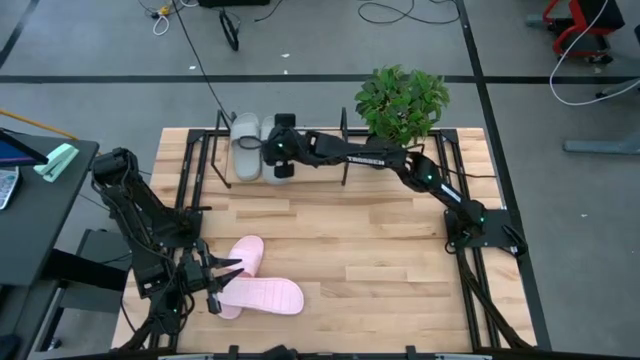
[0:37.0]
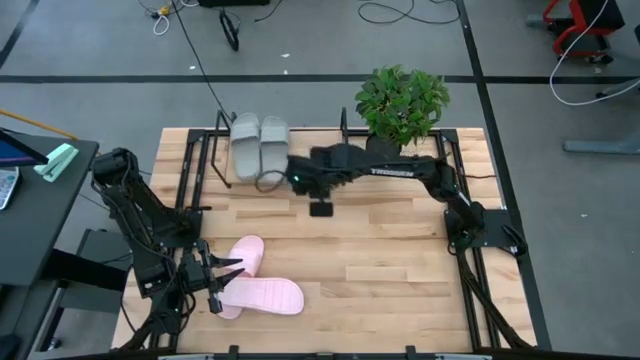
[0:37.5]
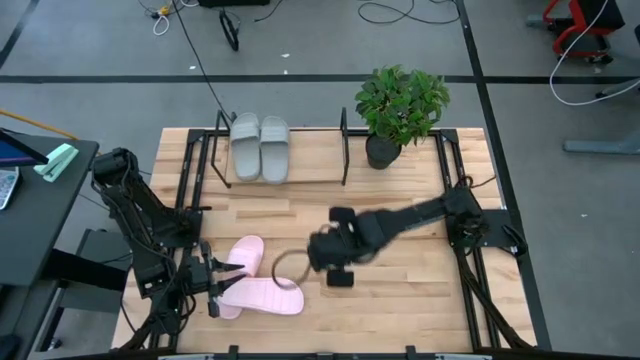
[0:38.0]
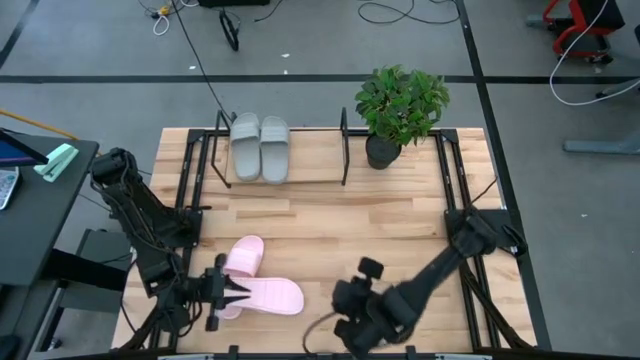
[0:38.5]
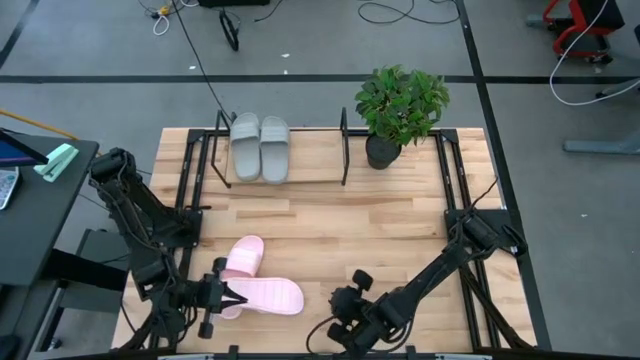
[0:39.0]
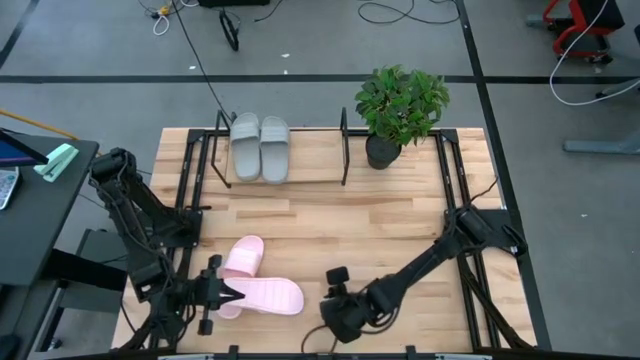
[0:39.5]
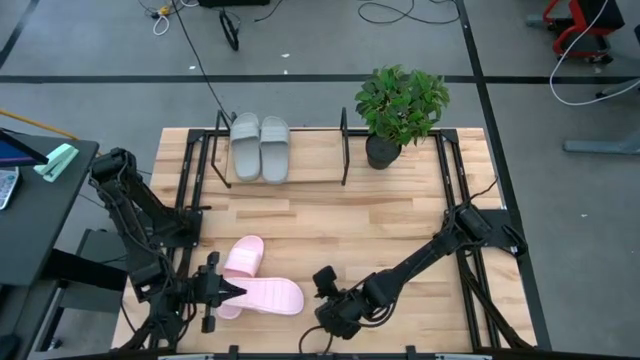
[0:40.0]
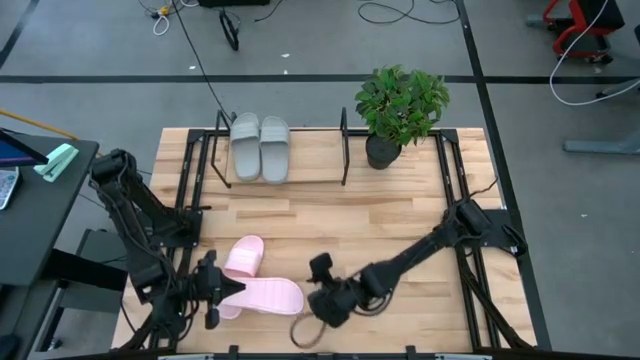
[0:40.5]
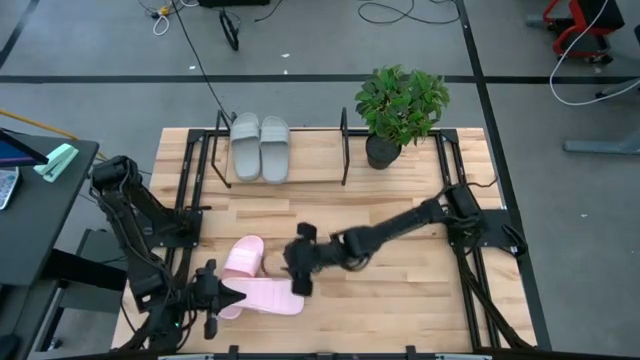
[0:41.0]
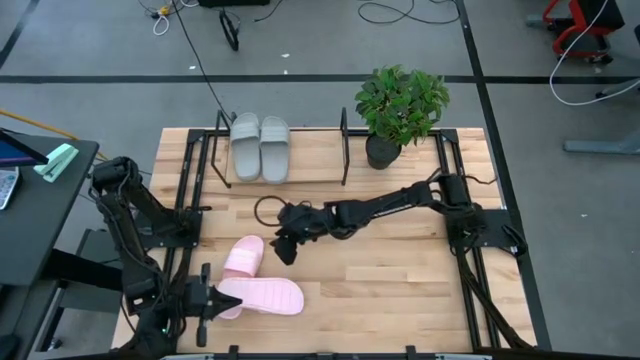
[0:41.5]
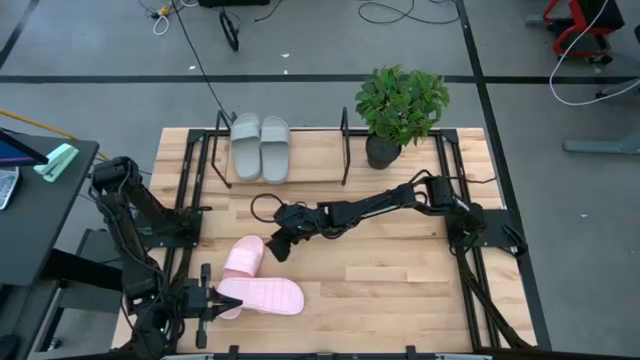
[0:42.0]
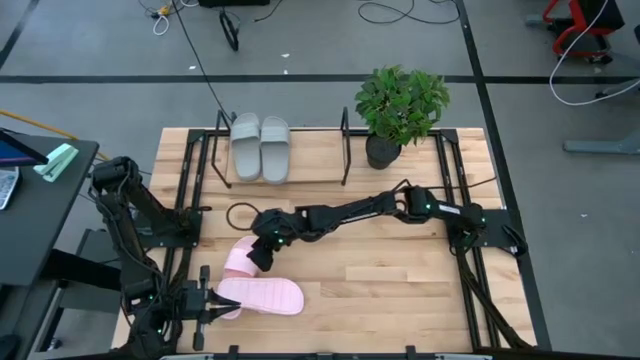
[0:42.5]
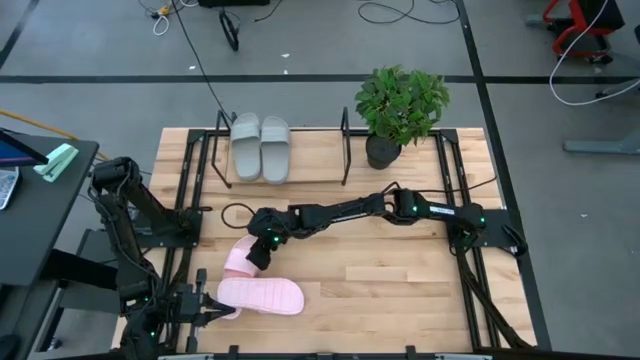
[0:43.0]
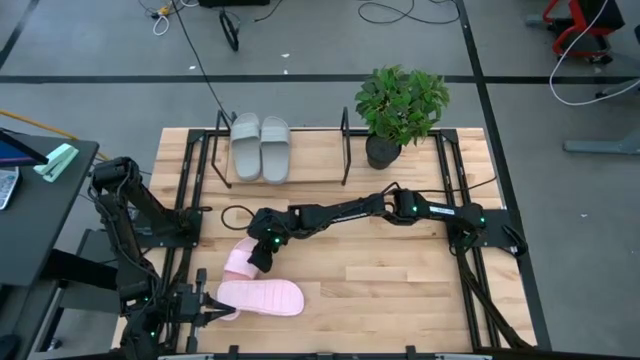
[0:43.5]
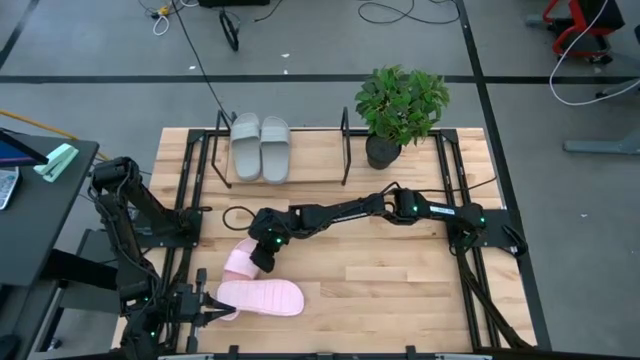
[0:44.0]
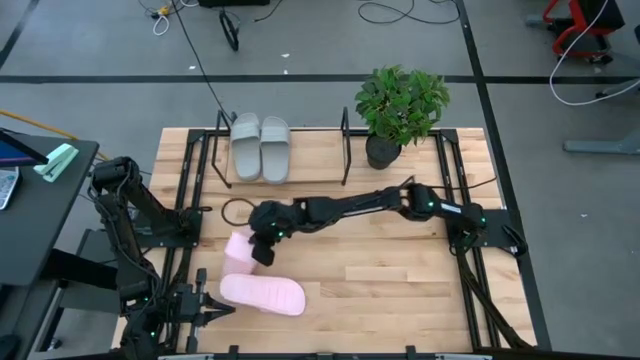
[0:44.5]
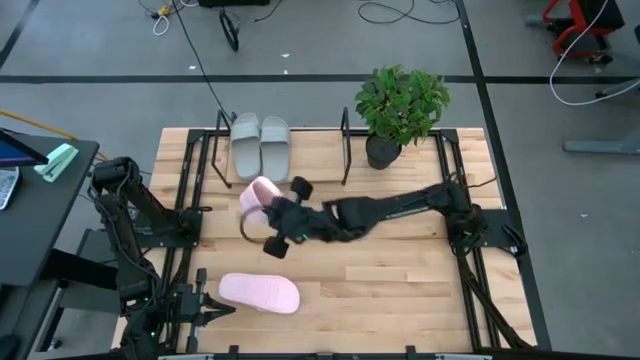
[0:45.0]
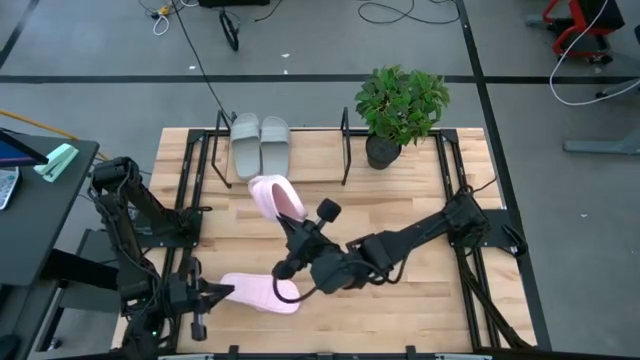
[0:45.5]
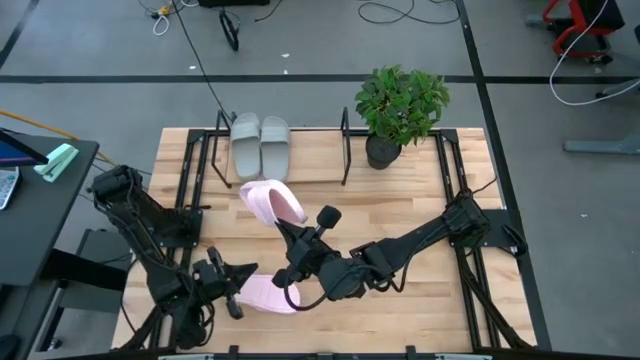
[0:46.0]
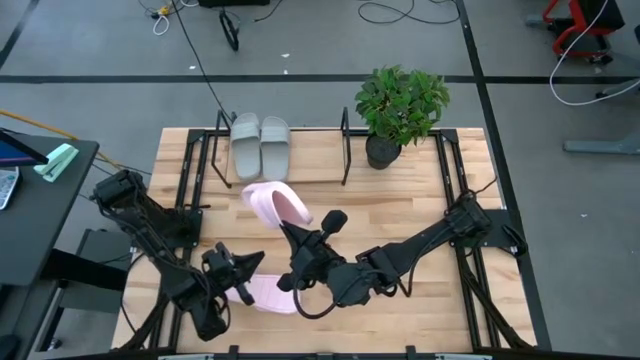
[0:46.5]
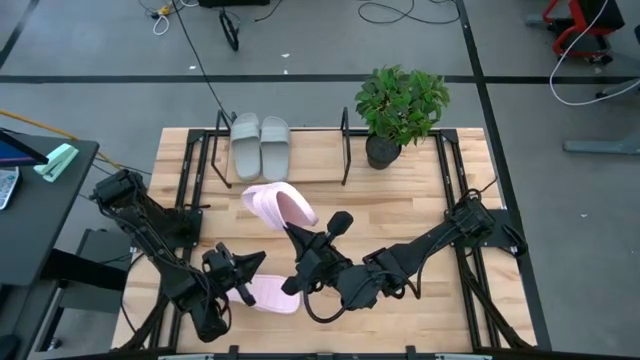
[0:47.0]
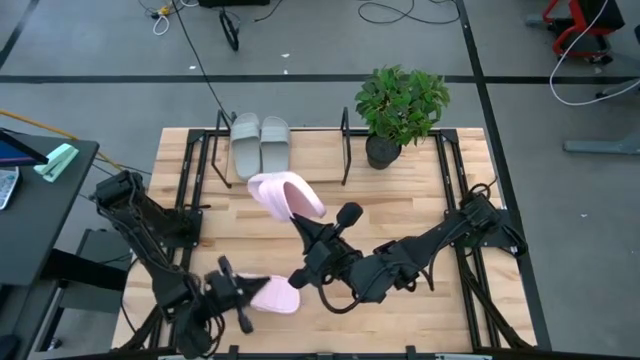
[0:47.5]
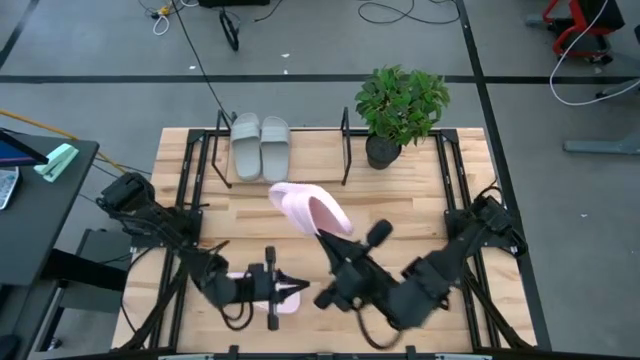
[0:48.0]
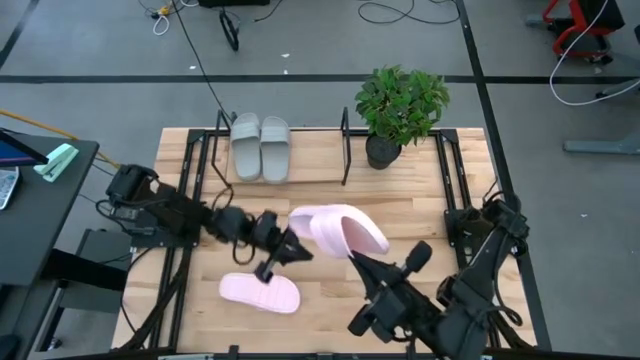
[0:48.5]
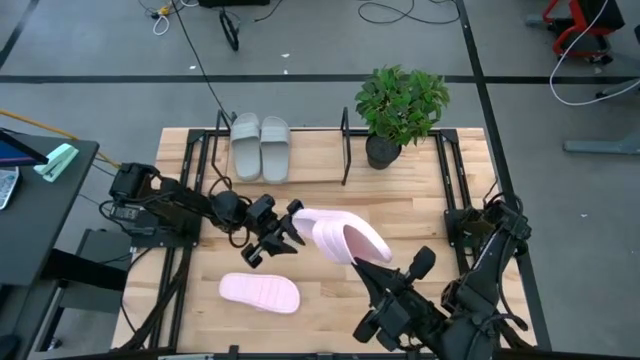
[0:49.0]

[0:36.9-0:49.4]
Task: Pick and place slides into the shelf
Put the bottom pink slipper on the shelf

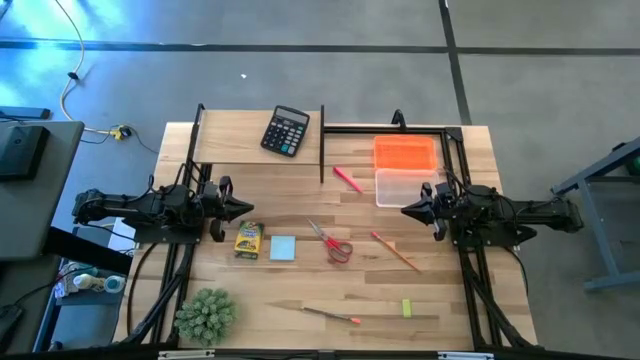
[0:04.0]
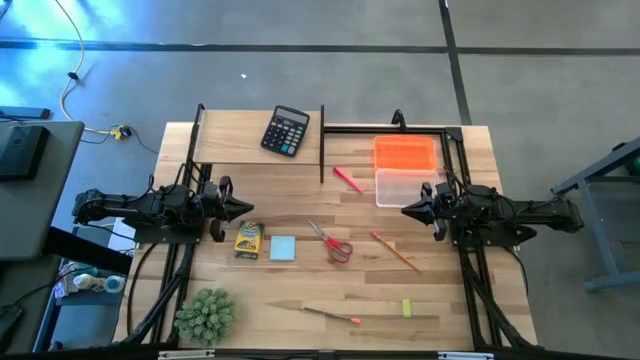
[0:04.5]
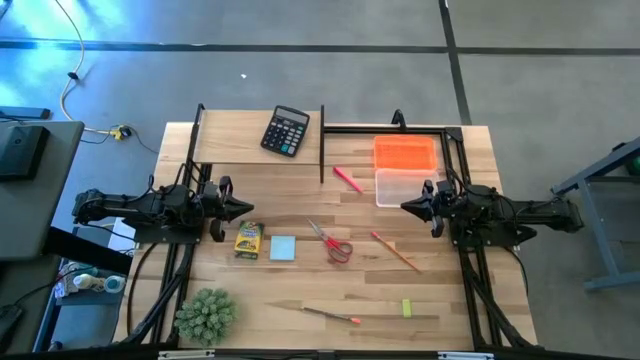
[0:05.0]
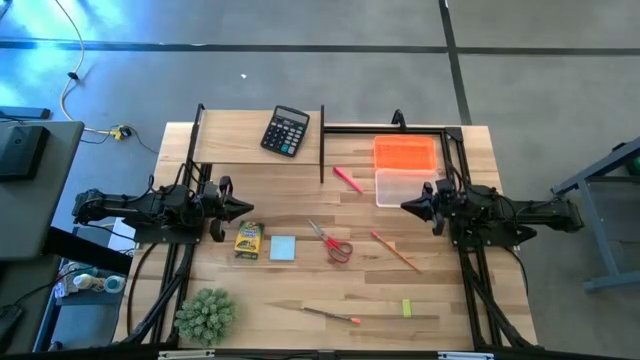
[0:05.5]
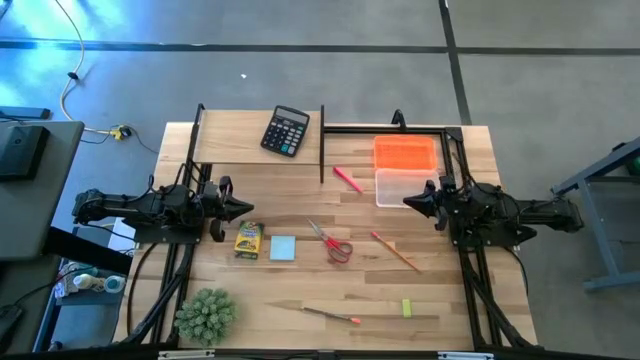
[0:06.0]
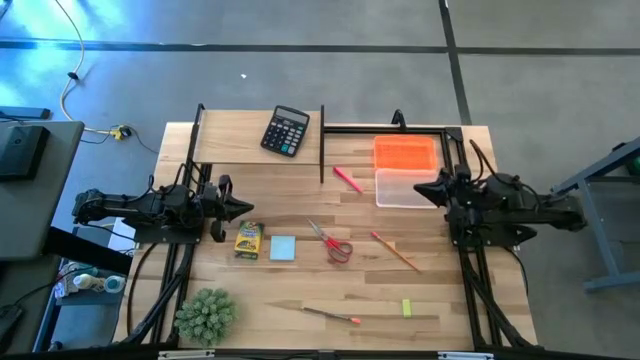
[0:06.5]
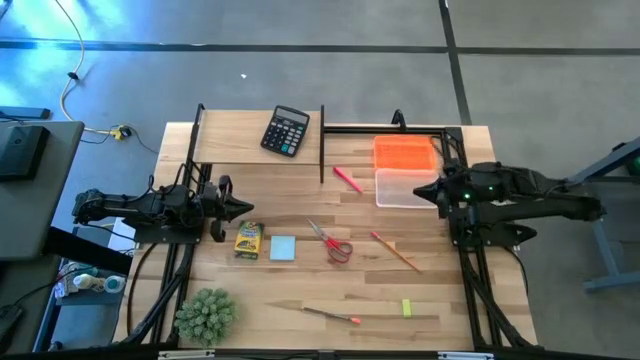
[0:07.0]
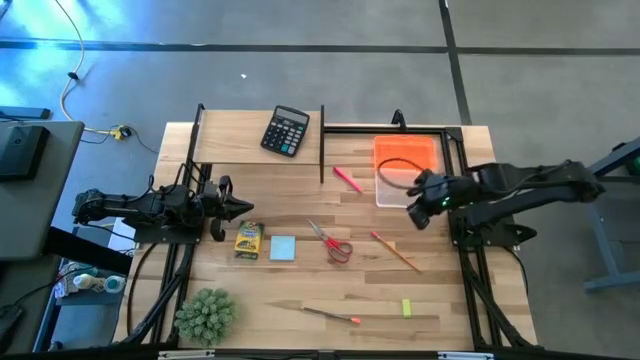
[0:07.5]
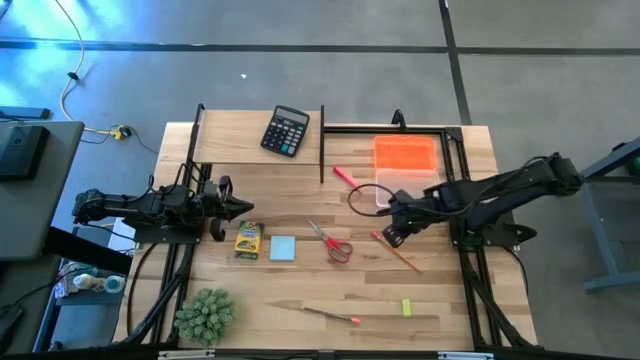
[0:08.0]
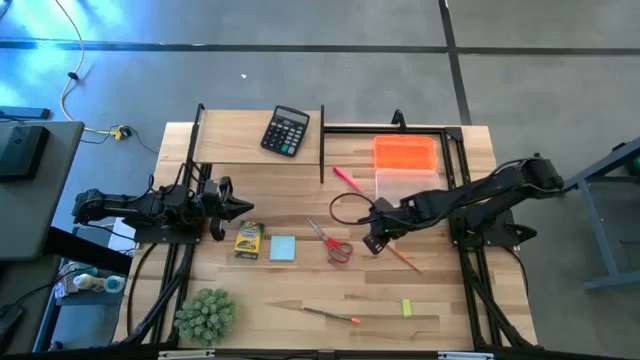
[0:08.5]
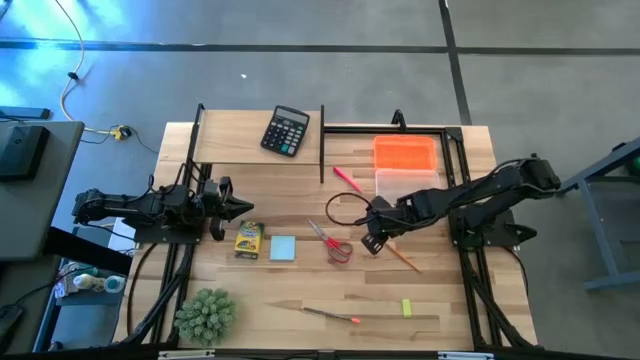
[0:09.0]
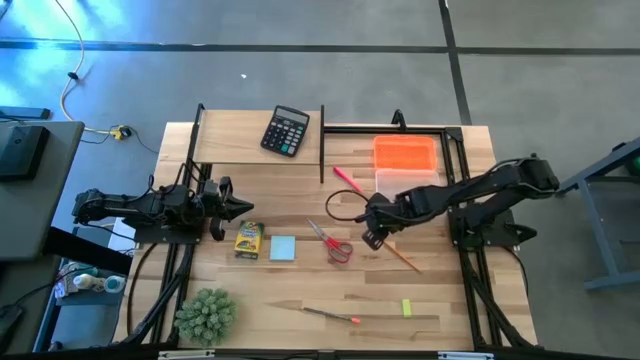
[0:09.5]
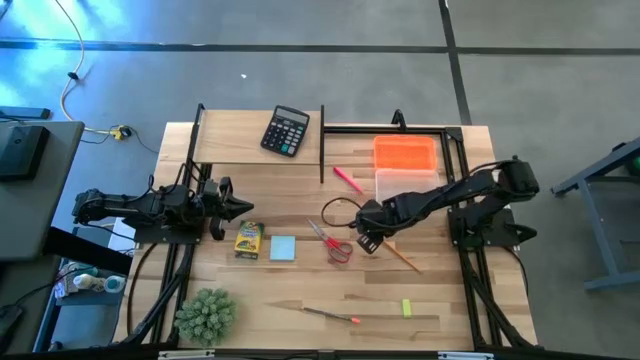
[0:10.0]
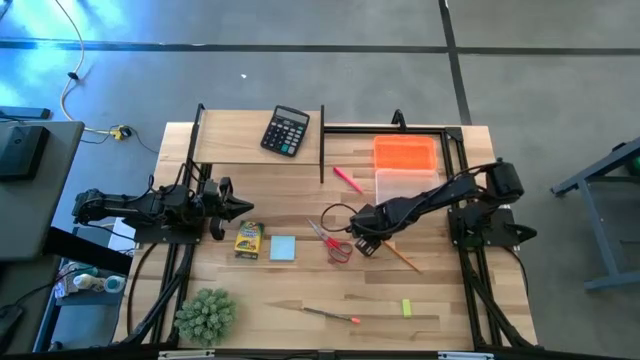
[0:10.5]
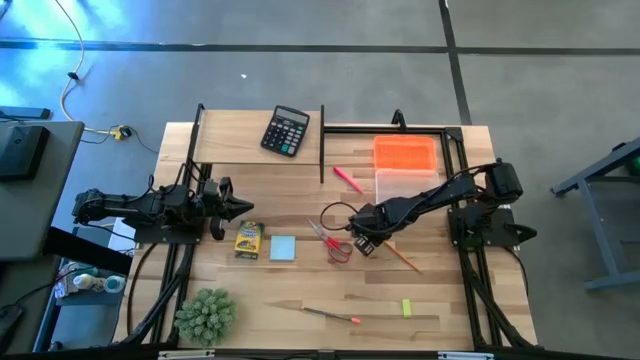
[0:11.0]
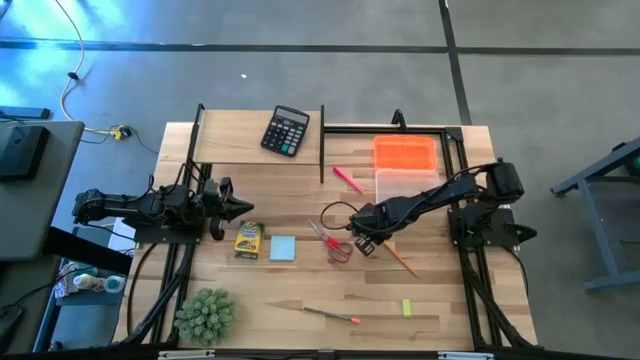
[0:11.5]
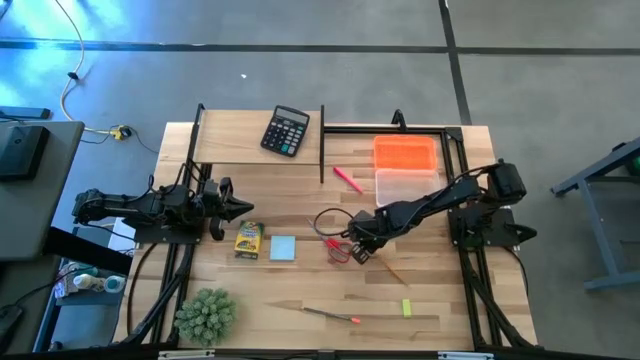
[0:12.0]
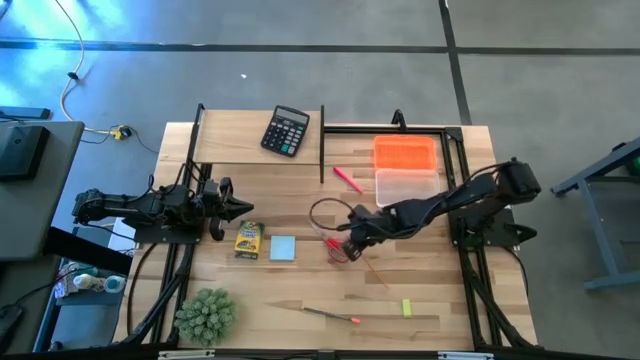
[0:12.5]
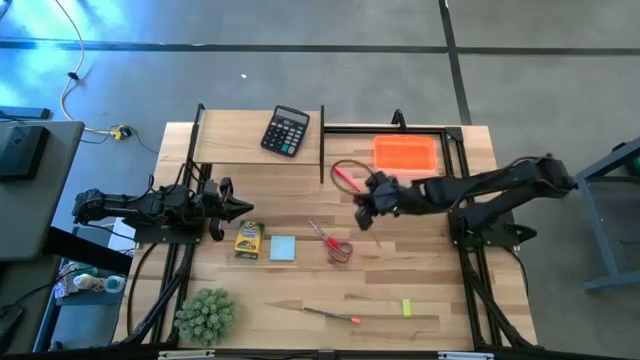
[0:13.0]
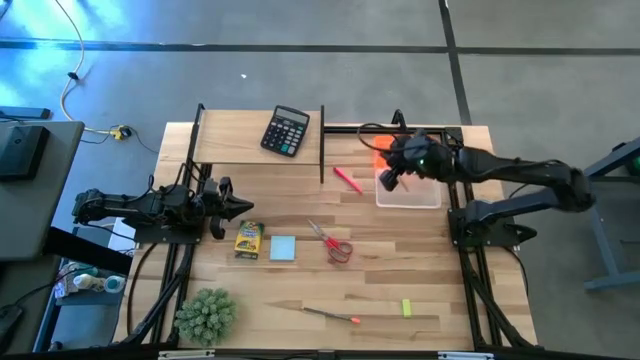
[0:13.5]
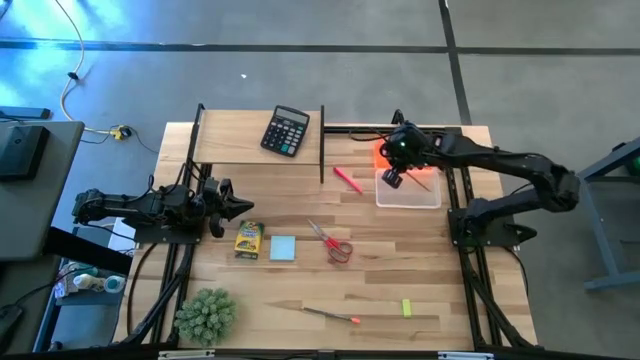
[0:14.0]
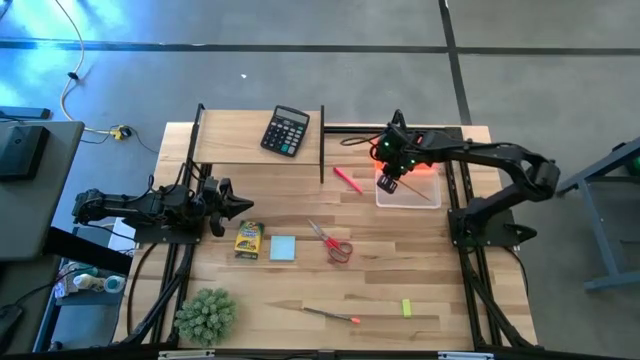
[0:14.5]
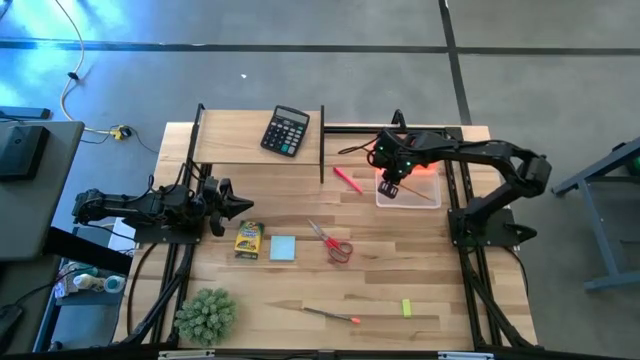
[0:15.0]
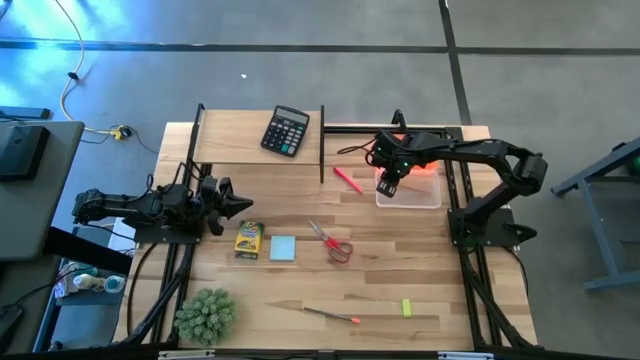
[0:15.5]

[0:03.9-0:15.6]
Task: Pack school essentials
Put the orange pencil into the orange supply box
